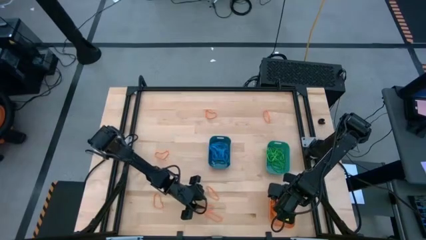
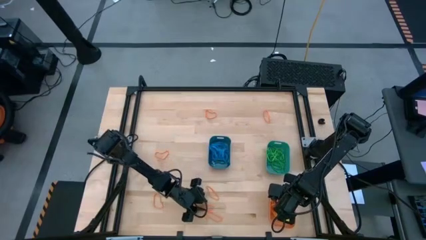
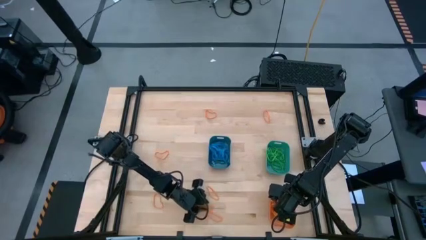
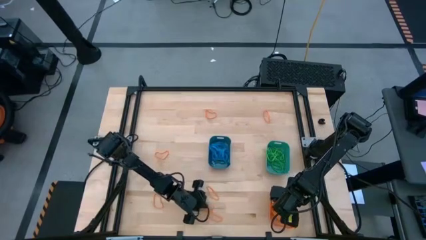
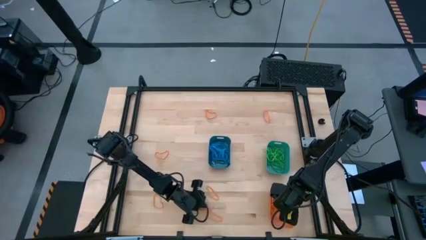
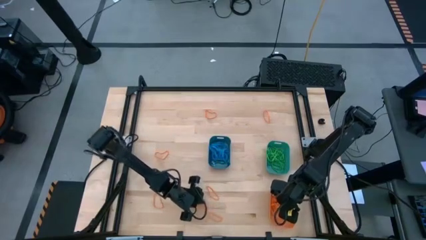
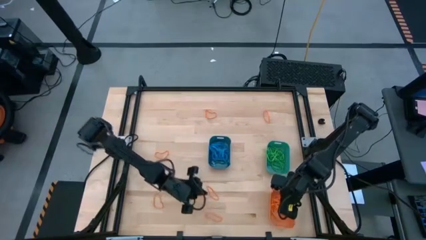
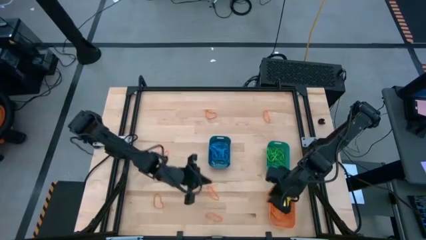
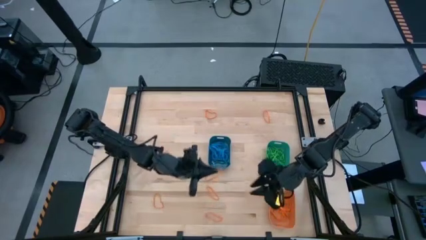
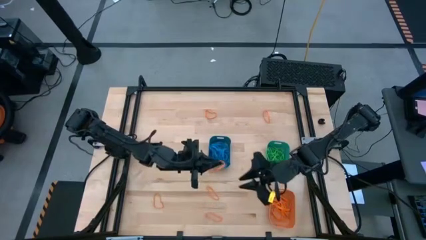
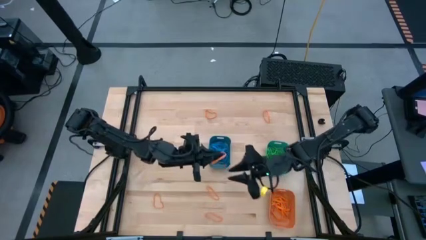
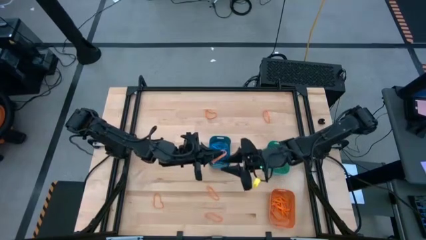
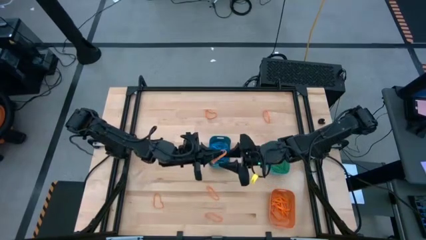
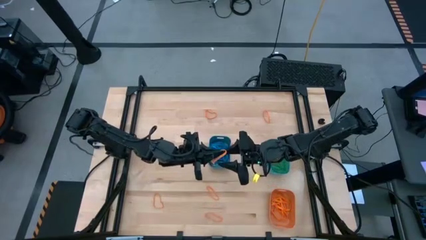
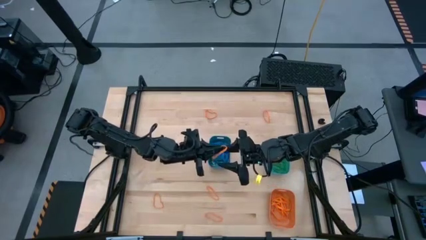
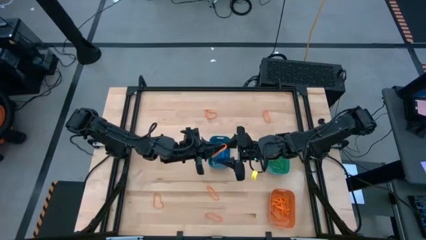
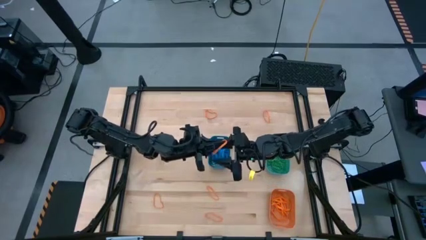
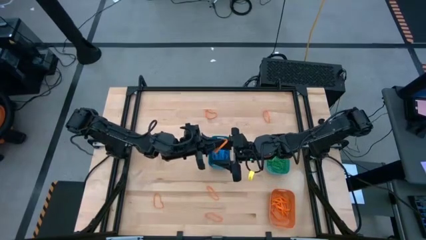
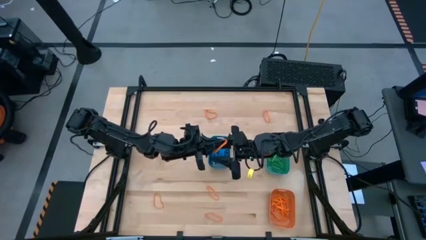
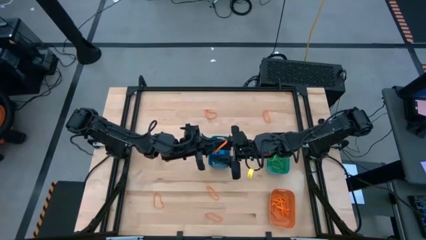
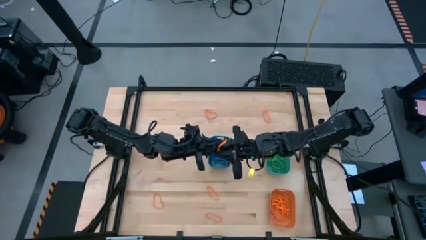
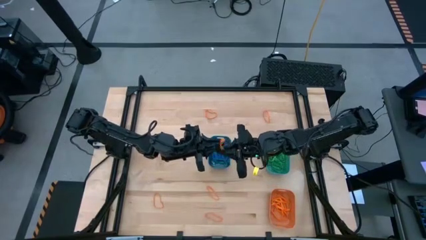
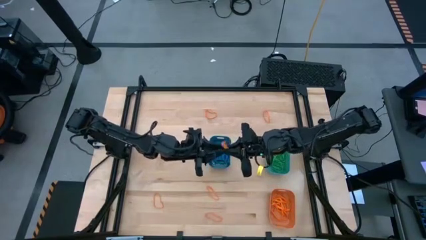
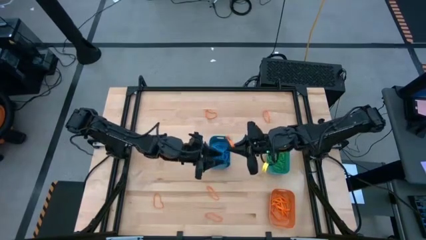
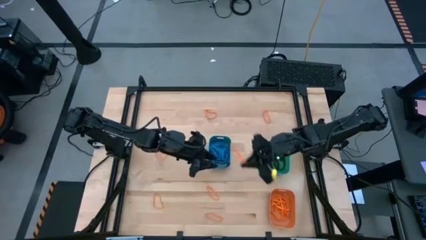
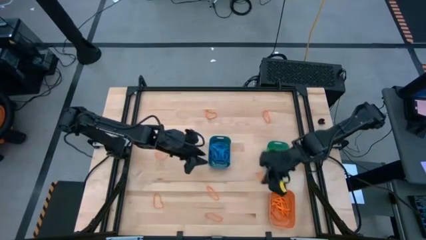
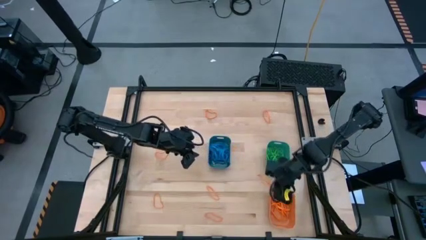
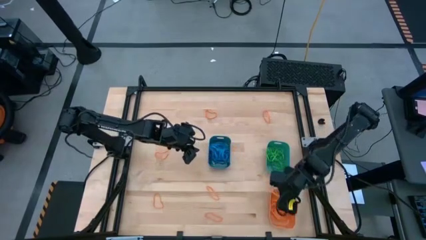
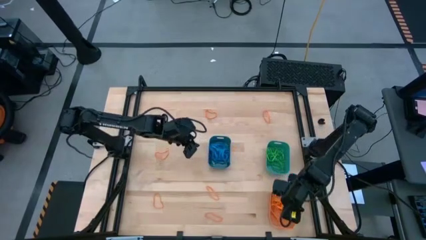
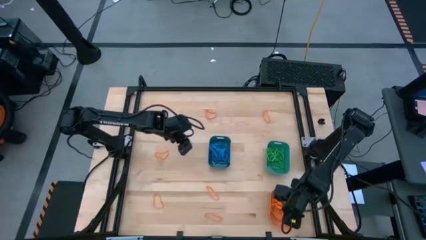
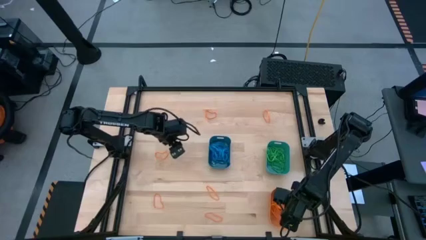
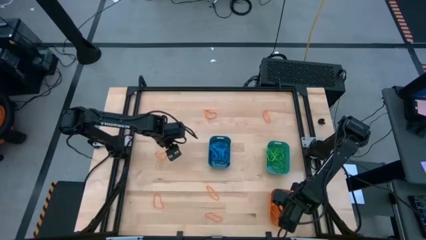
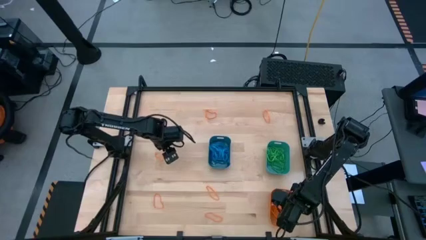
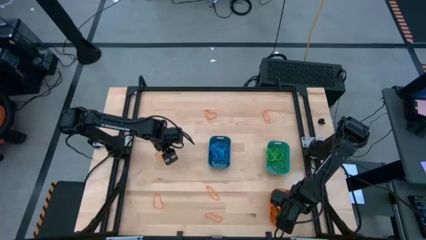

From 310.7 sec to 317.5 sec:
Task: Sort rubber bands into baskets
Put the orange rubberband into the orange bin

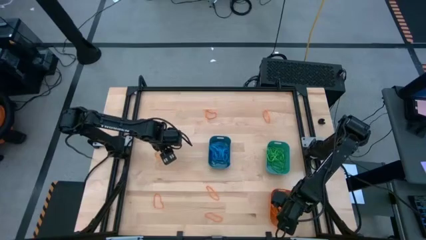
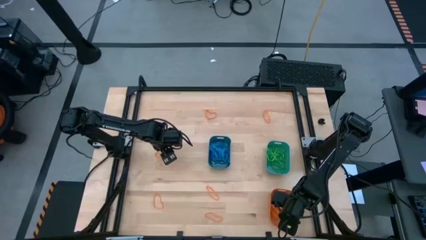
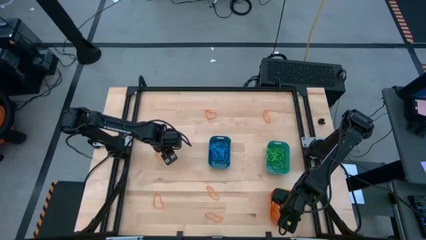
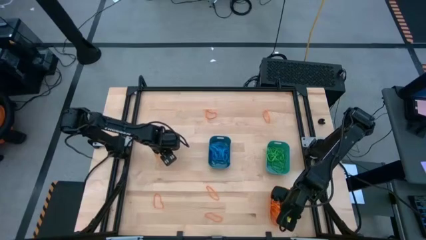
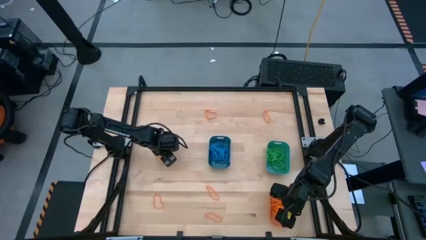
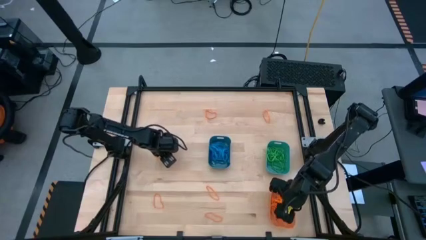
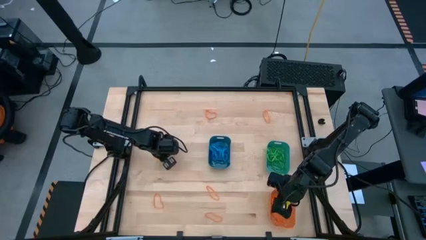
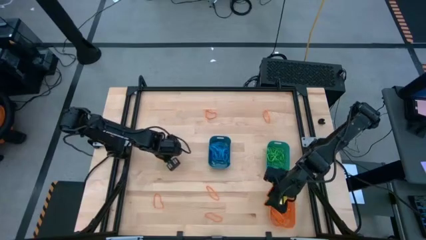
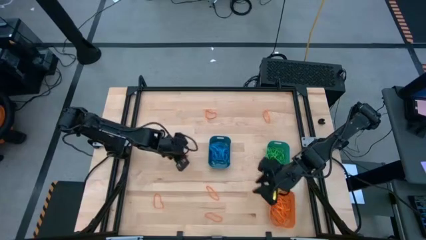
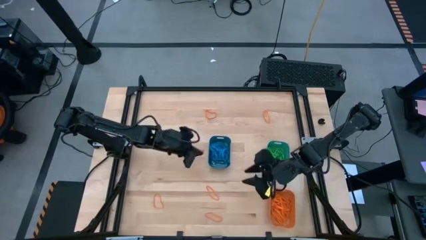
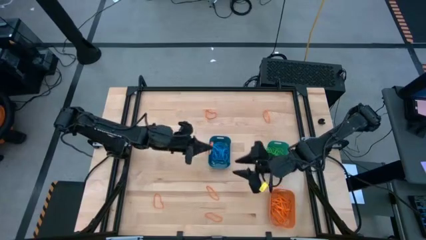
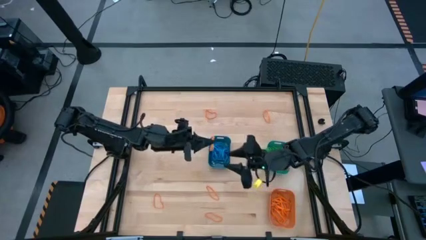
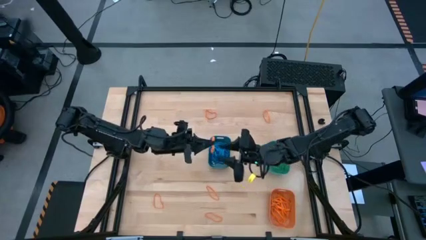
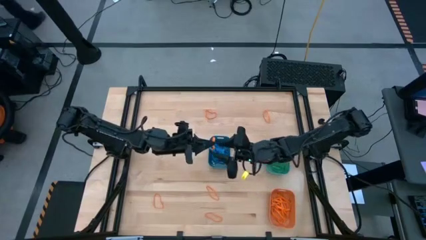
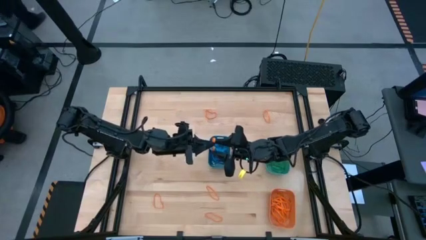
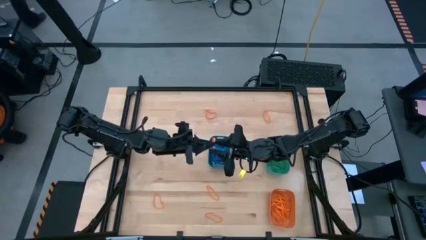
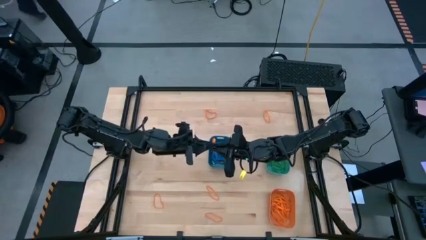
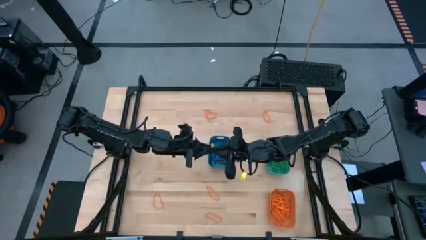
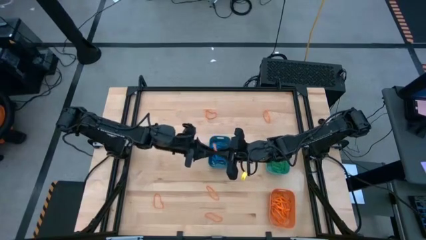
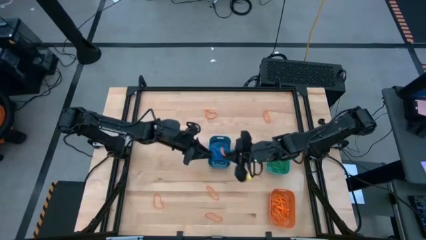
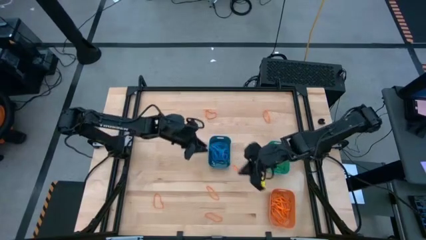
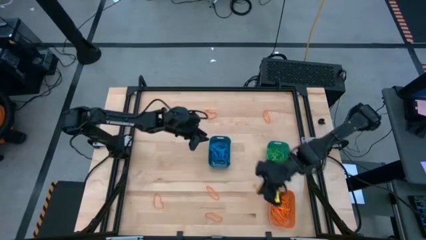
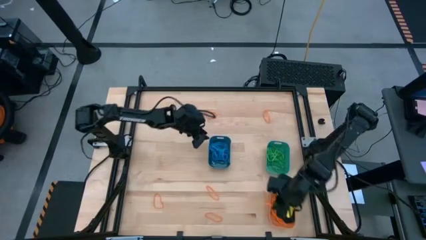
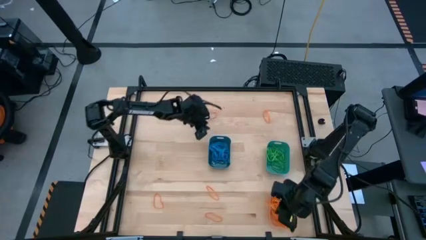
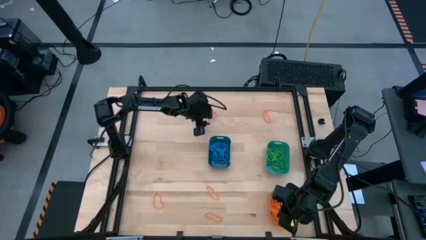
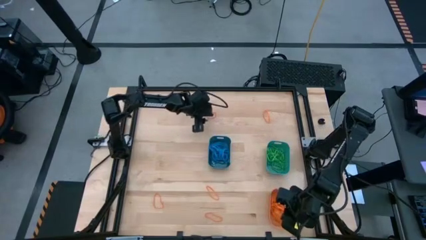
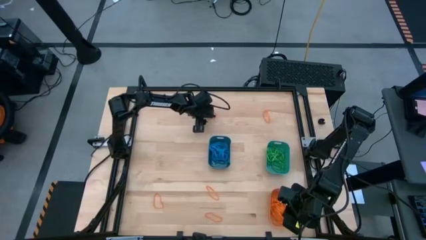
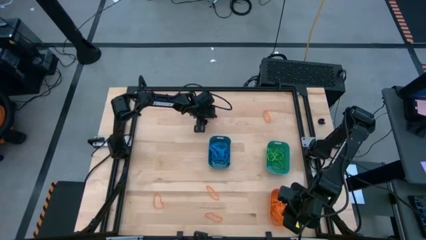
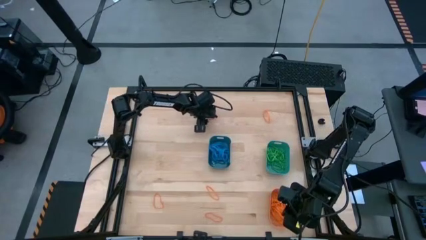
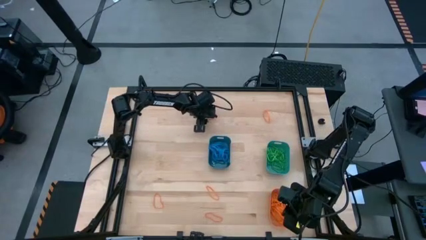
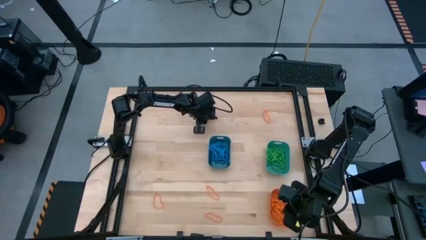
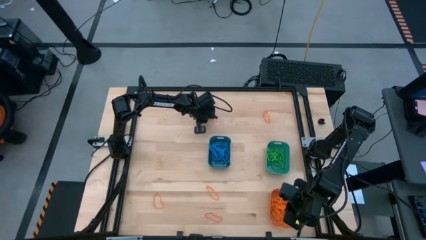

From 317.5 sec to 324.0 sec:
Put the orange rubberband into the orange bin

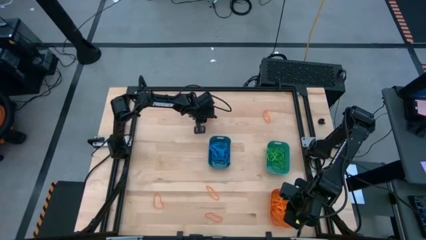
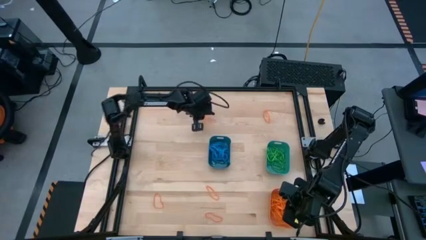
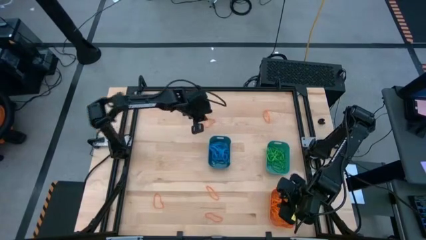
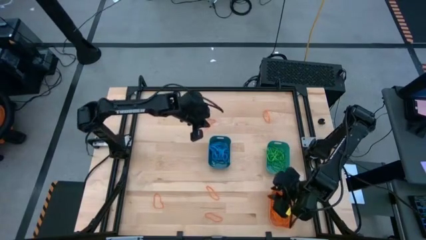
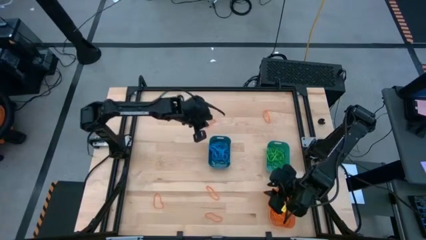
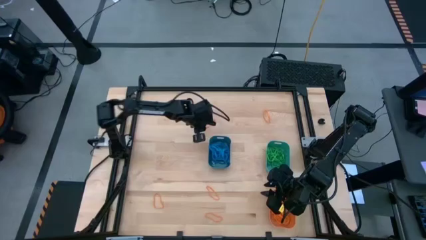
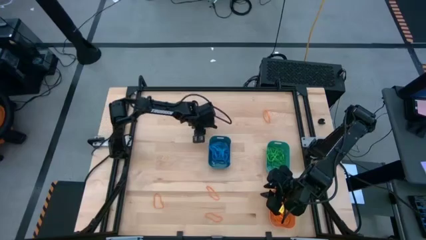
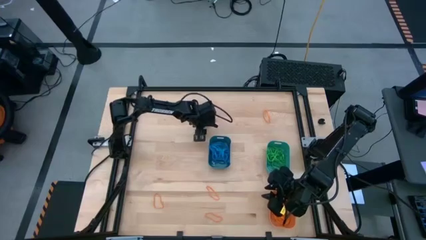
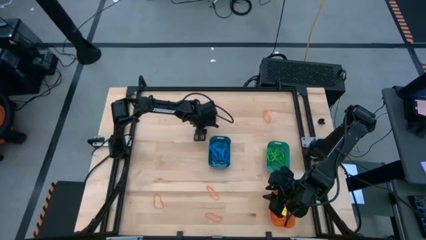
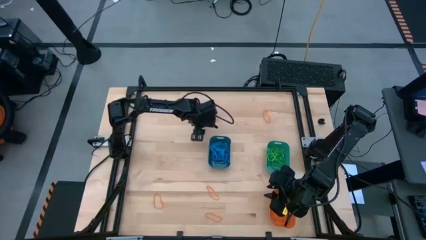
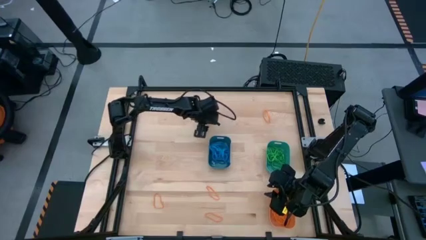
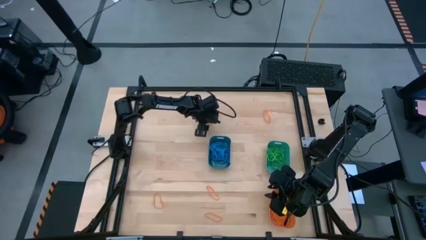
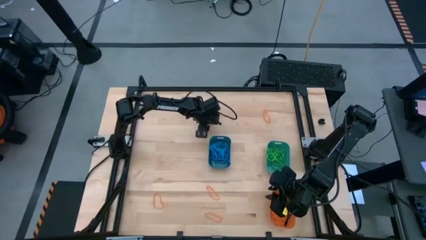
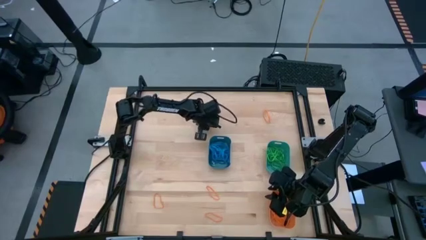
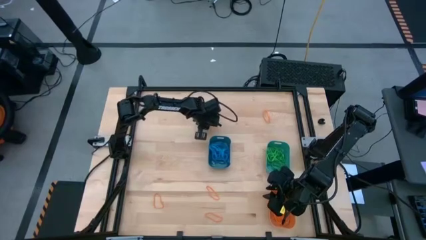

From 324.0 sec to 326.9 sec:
Put the orange rubberband into the orange bin
